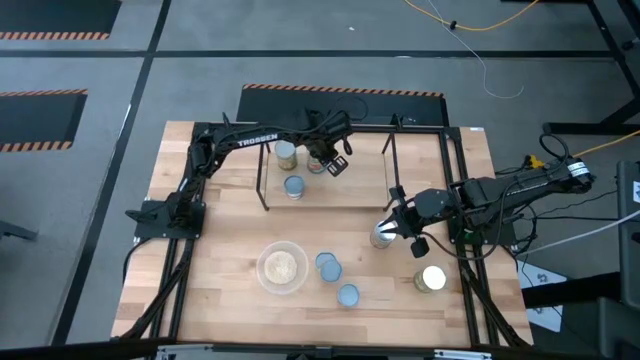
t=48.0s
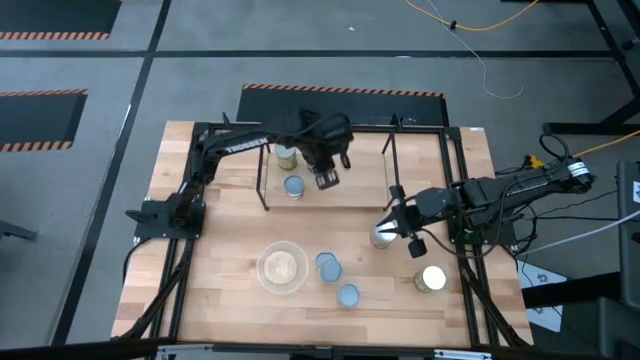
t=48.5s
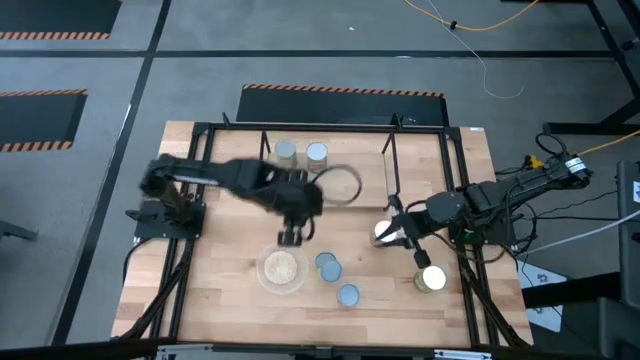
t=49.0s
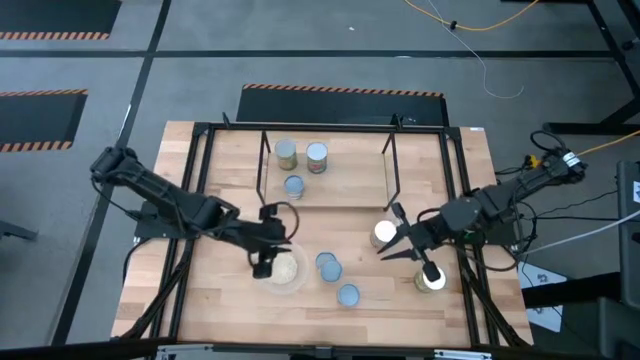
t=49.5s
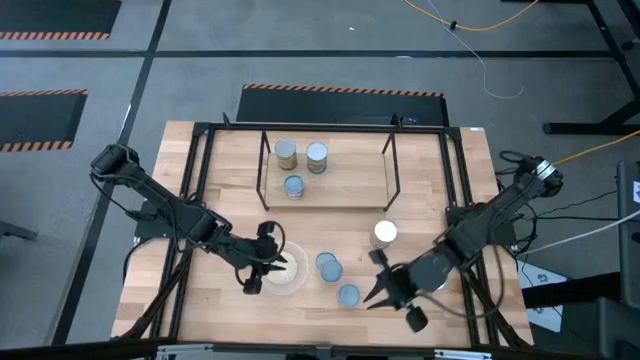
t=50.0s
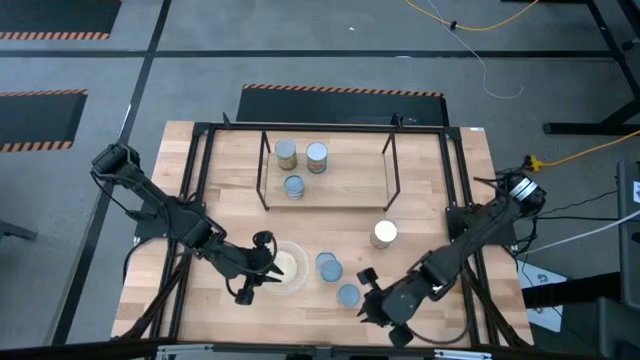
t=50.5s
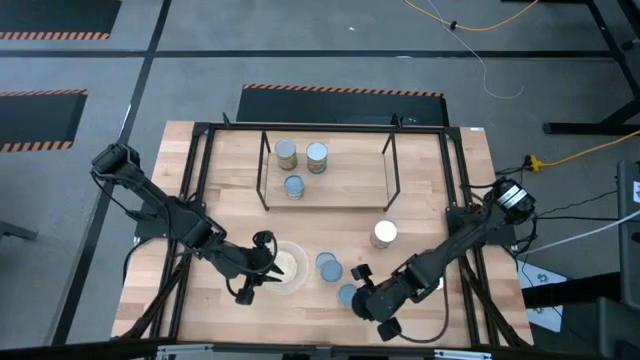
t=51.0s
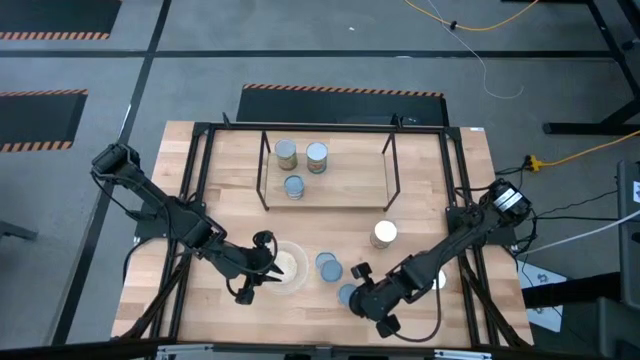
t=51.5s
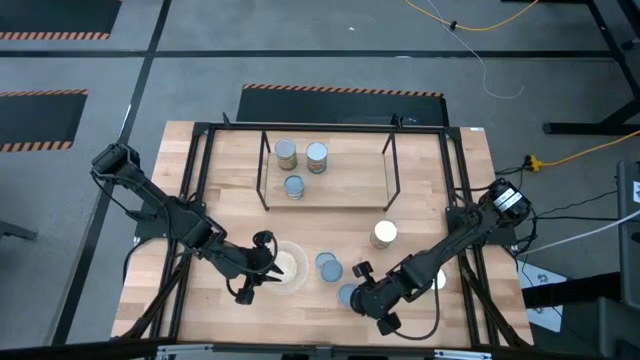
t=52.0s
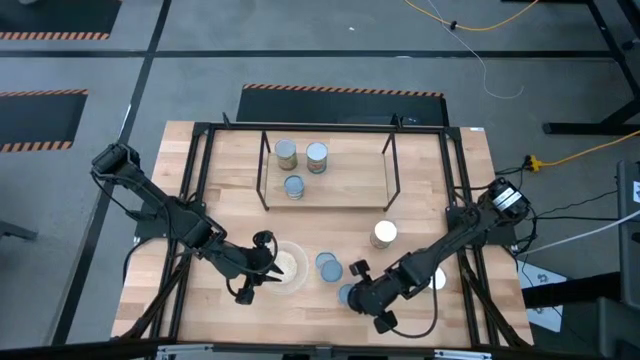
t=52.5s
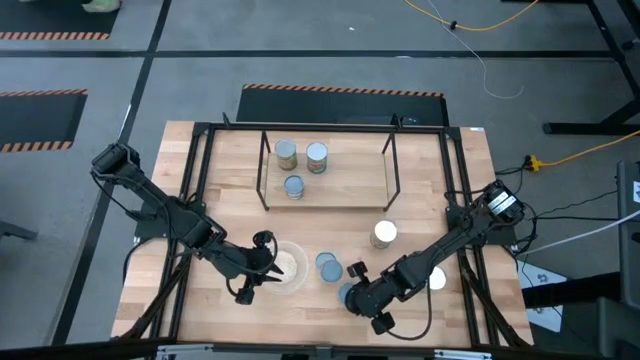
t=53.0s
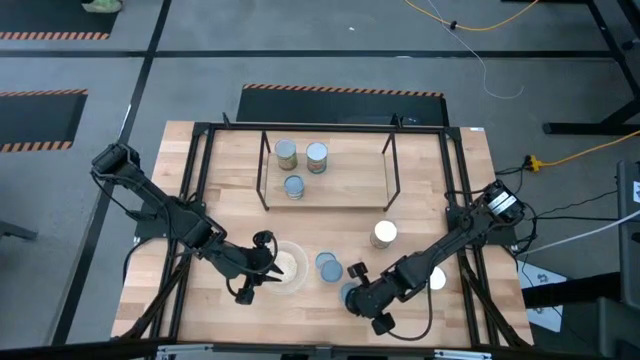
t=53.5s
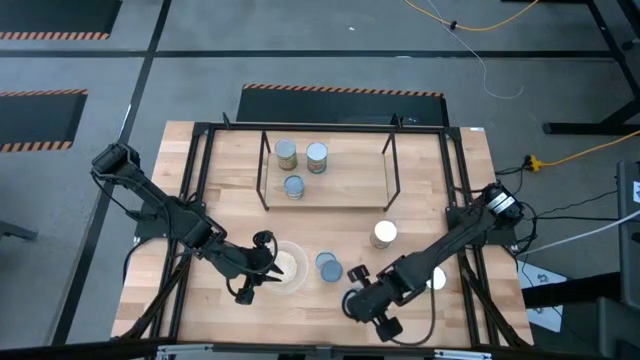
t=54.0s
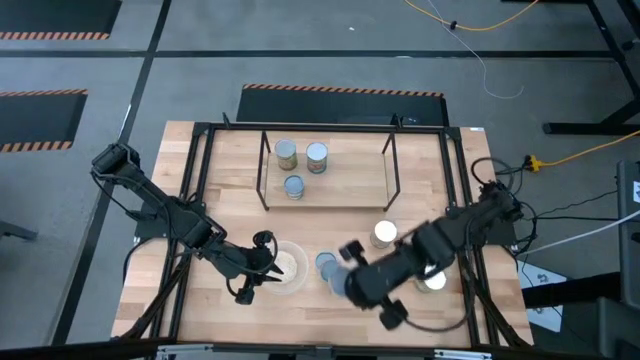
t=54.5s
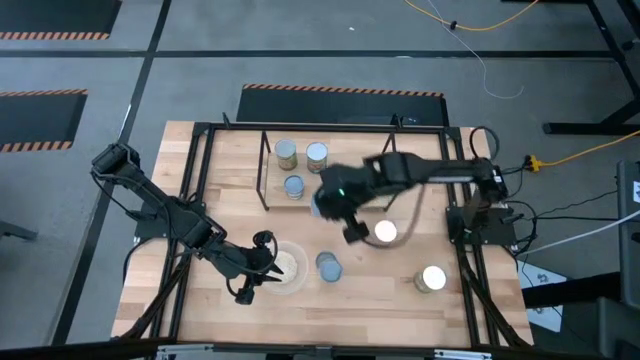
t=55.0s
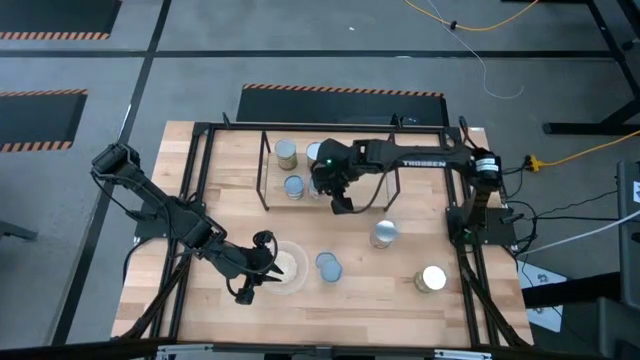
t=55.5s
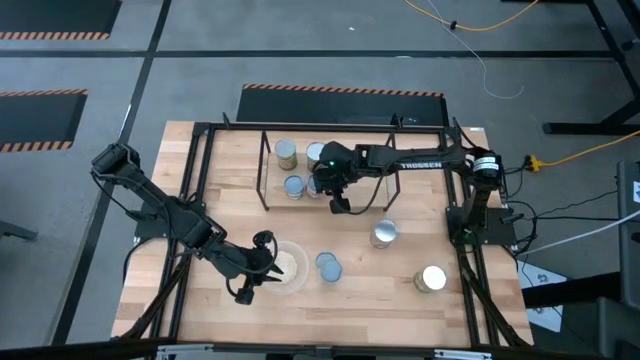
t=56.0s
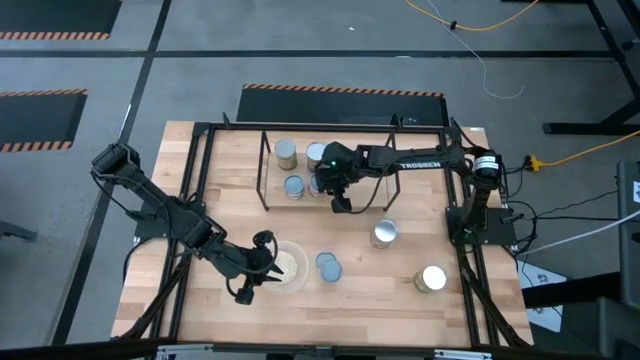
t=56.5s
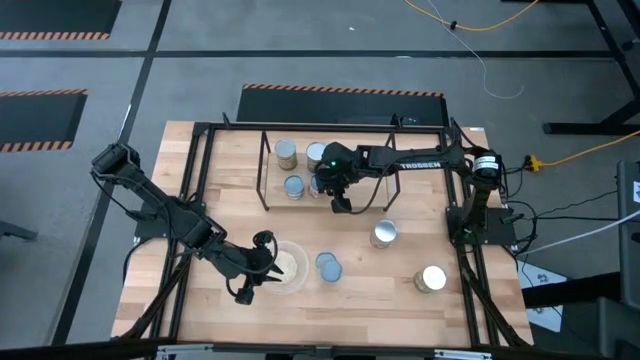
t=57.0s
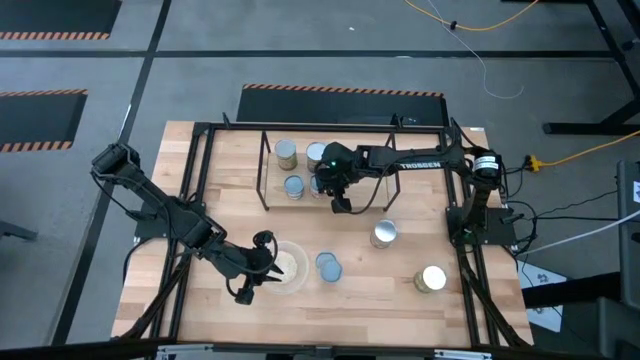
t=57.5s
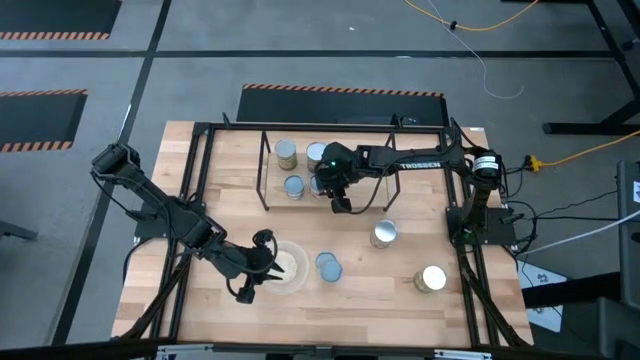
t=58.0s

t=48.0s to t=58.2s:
Task: Pick and place cans onto a shelf
Put the canned diced tomato on the shelf

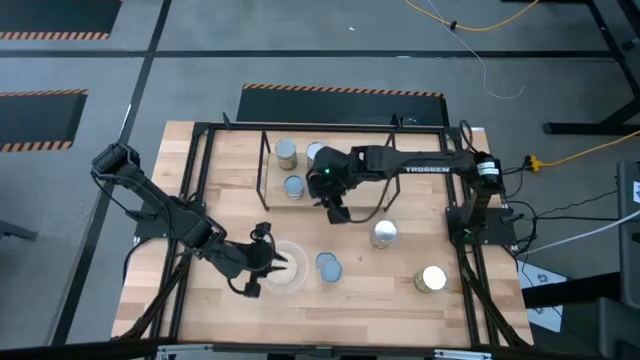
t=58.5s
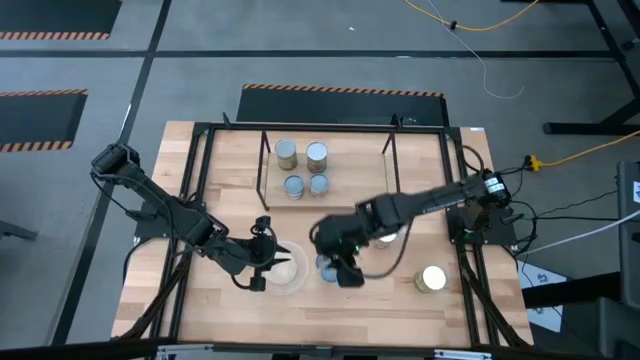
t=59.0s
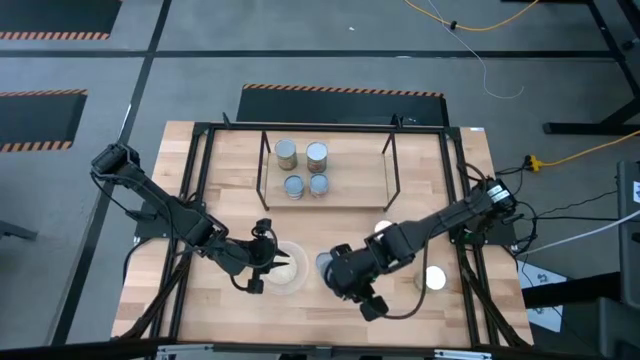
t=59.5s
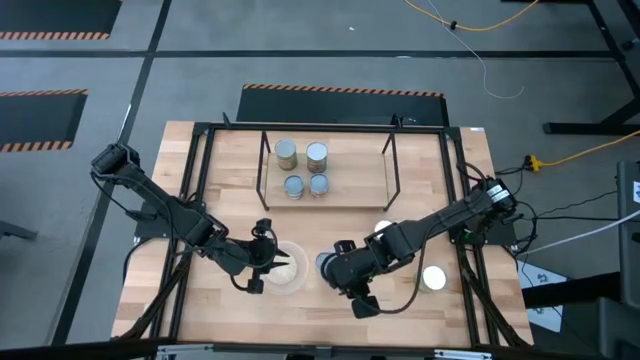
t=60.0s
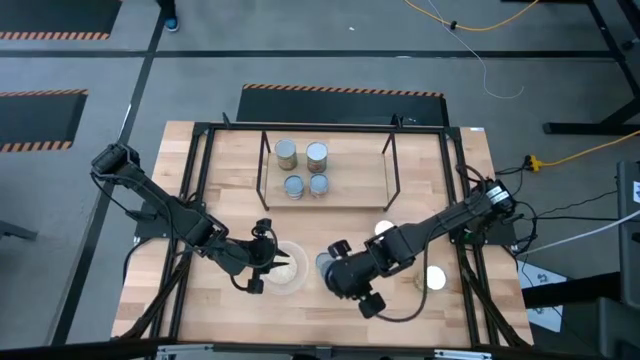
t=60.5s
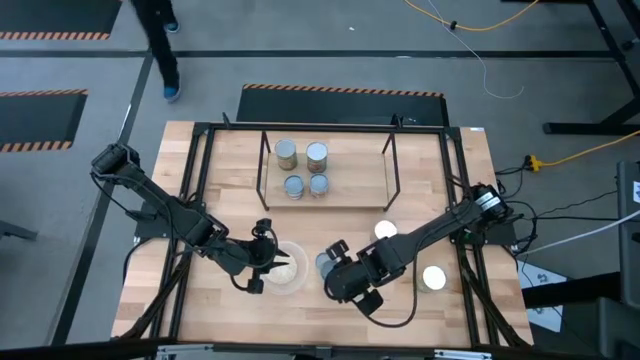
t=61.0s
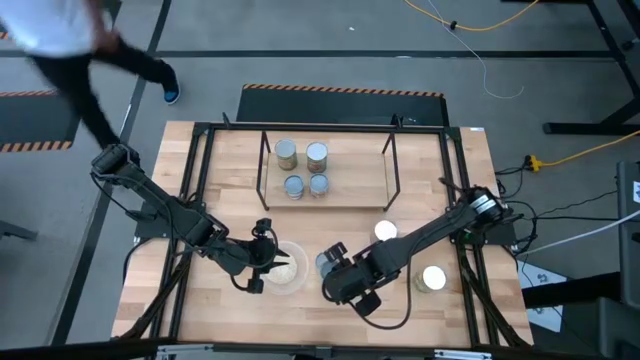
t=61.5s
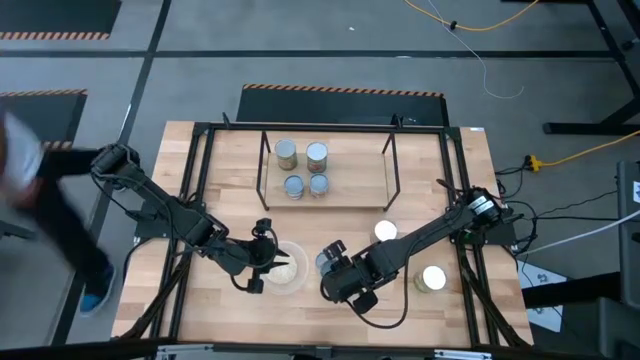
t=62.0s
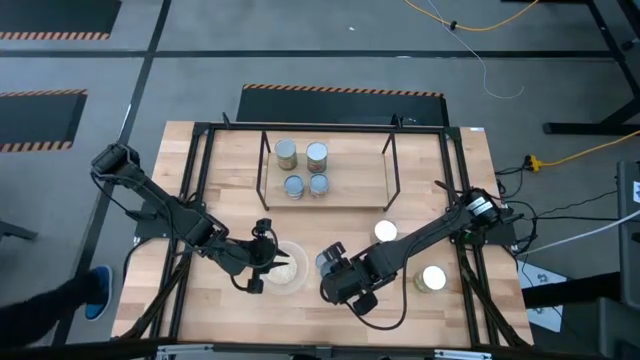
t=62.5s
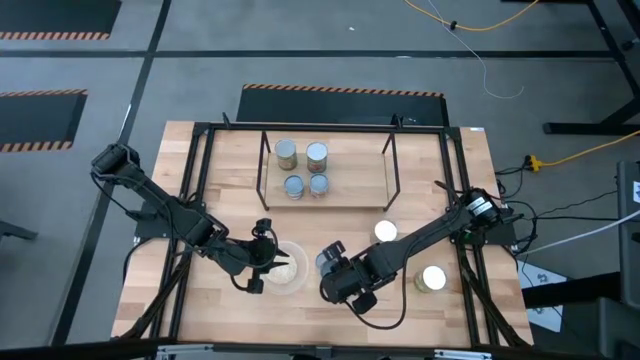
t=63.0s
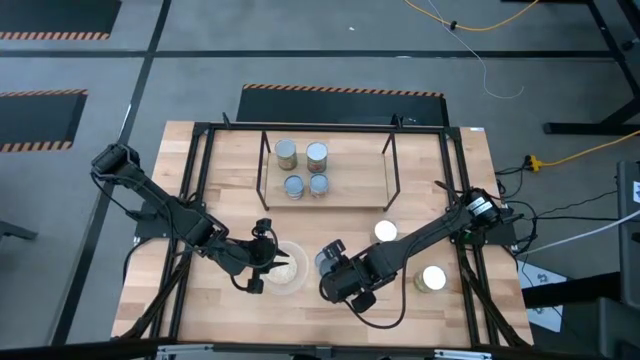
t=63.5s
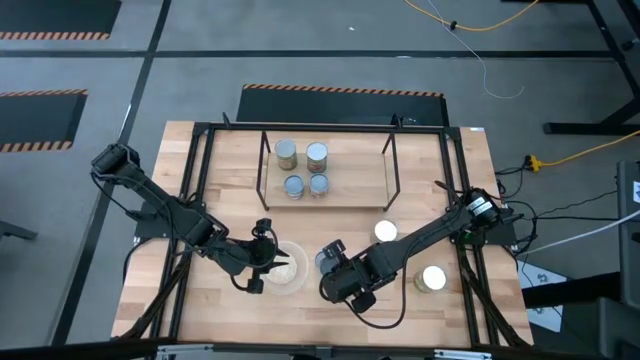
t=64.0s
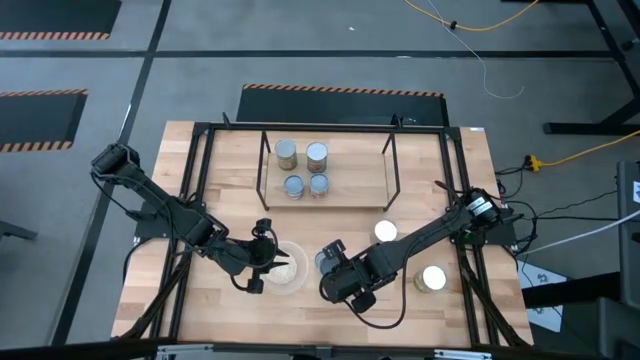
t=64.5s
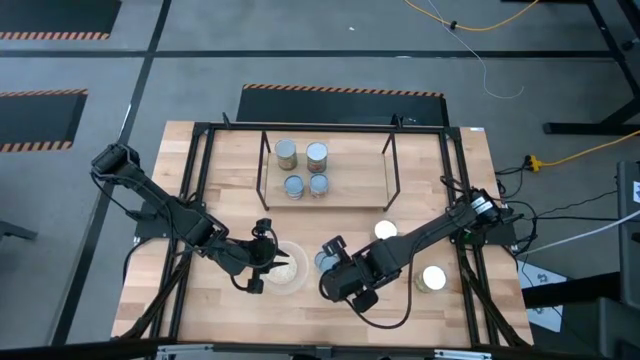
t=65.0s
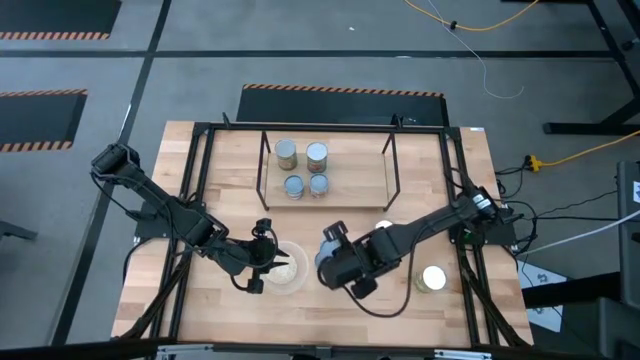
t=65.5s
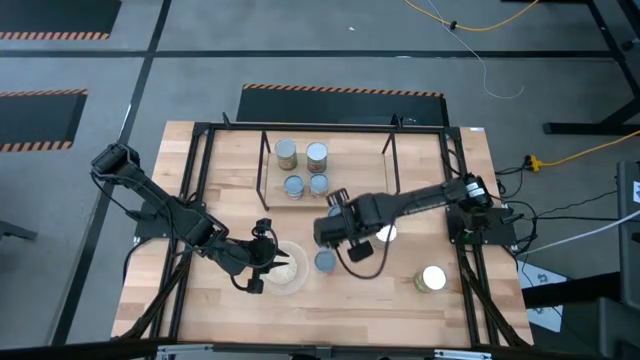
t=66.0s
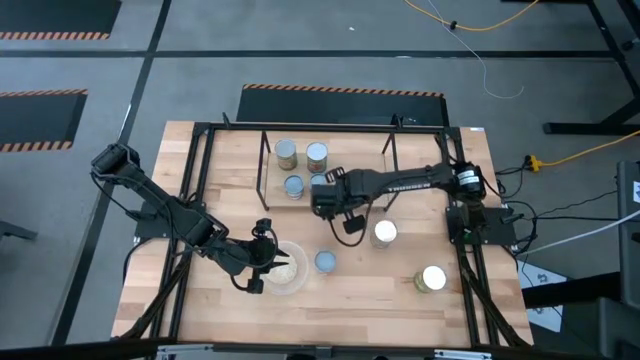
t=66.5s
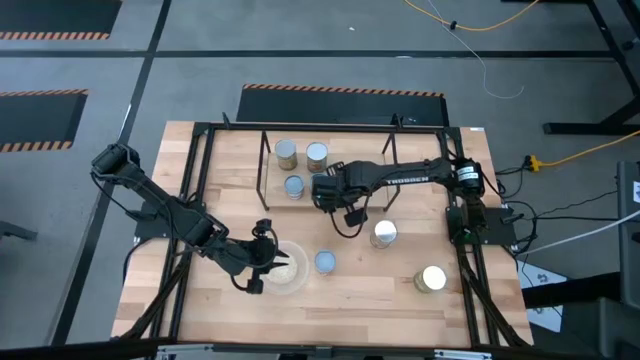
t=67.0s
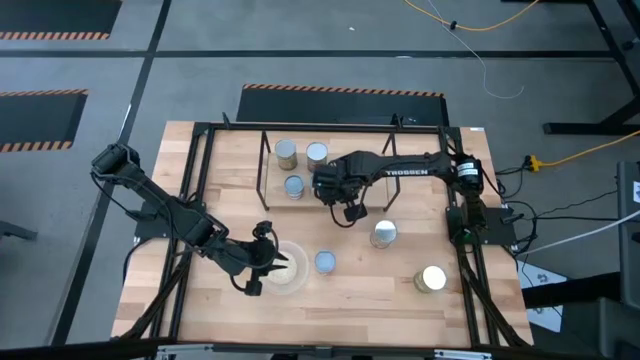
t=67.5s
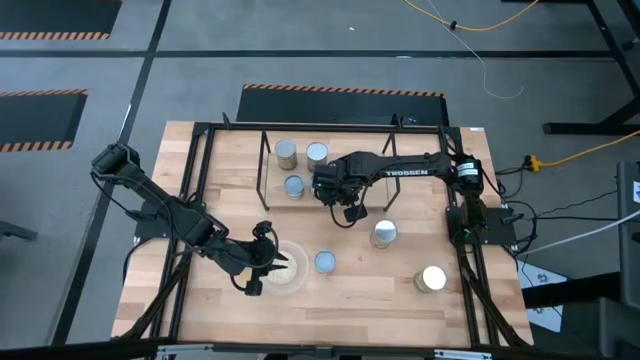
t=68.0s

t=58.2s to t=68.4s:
Put the canned pineapple on the shelf

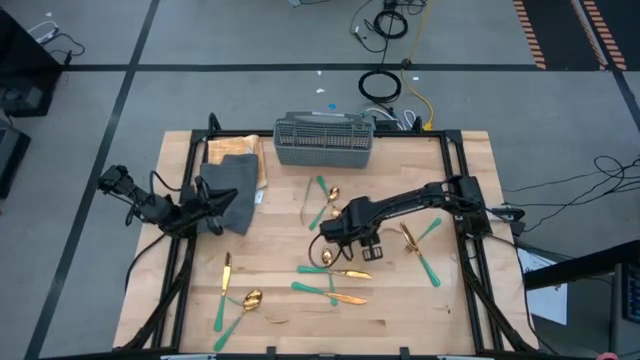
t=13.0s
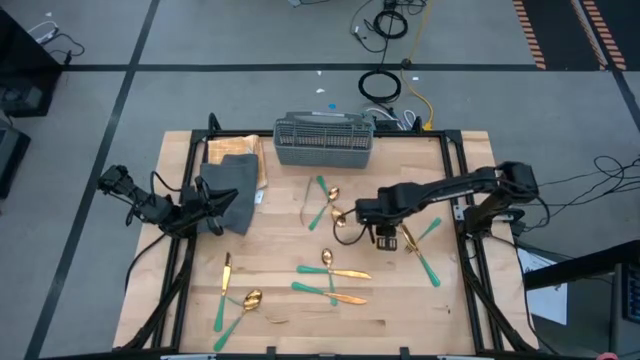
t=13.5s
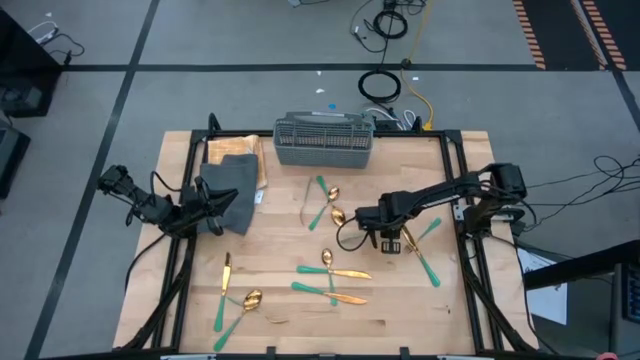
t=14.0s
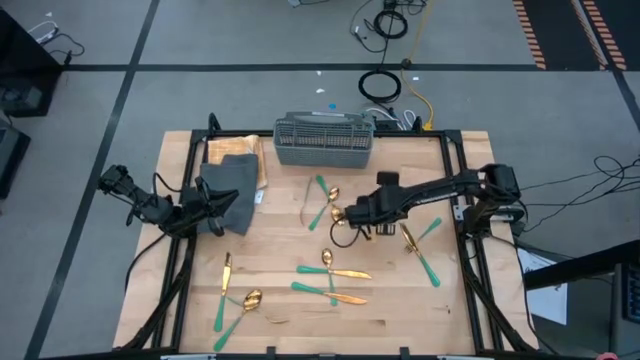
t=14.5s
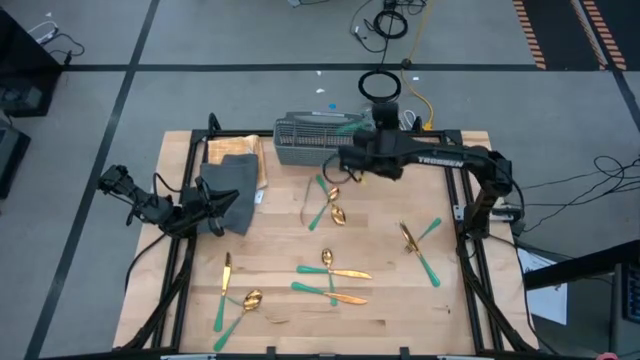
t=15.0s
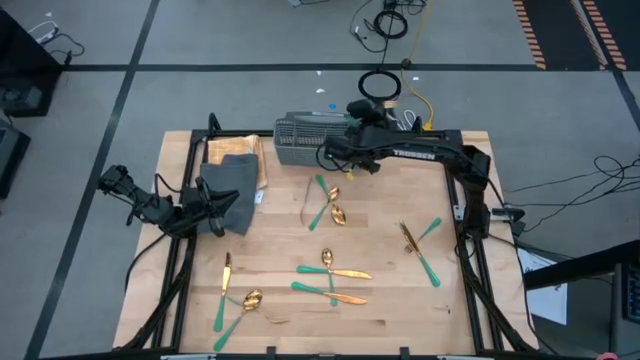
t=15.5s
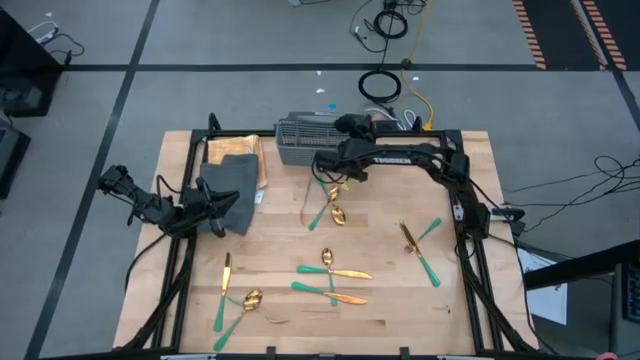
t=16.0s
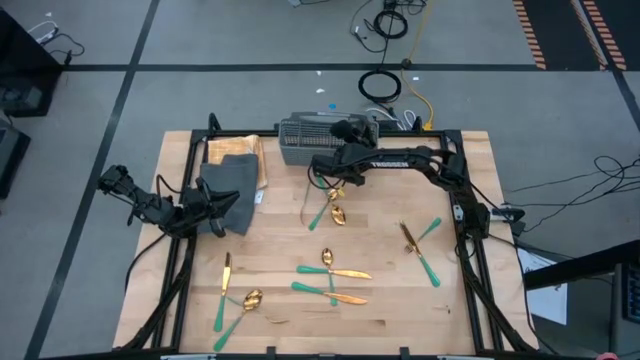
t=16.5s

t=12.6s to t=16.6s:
Task: Sort silverware
Put the green fork into the silverware basket
